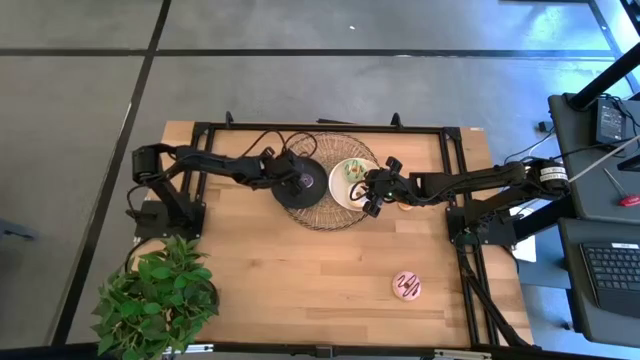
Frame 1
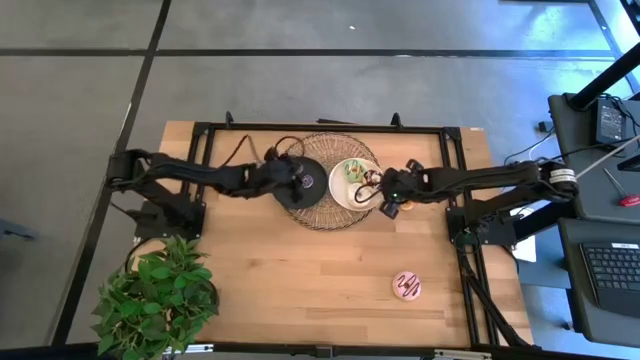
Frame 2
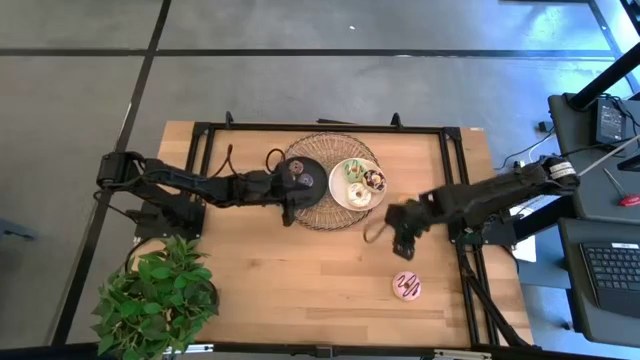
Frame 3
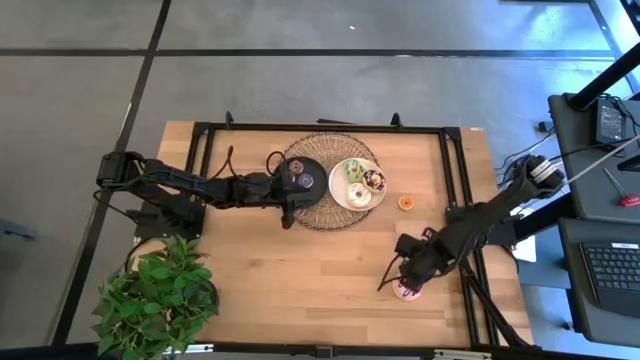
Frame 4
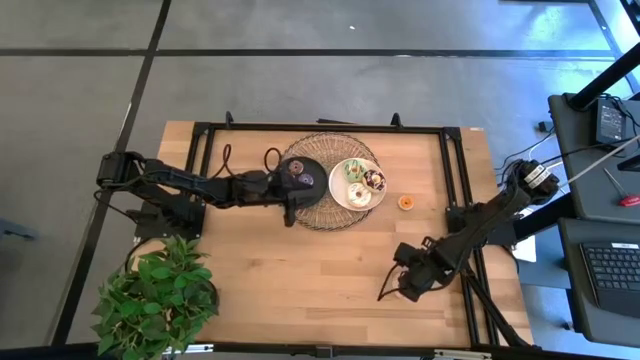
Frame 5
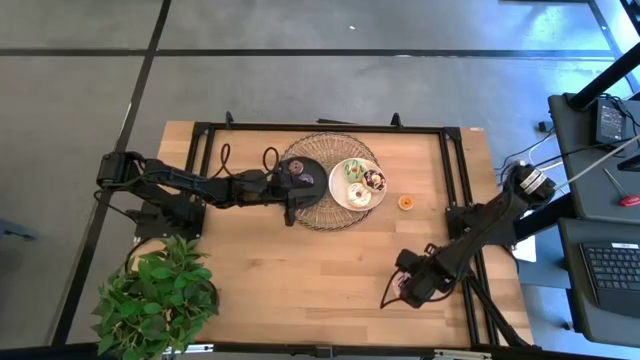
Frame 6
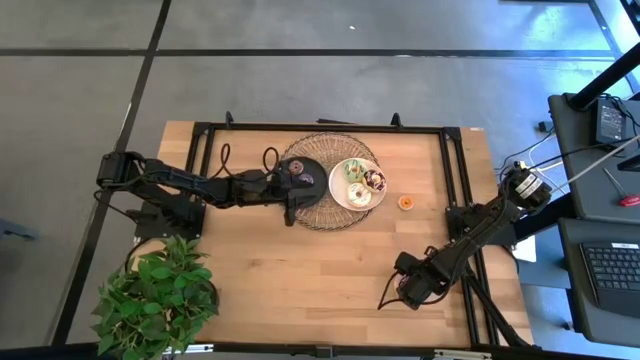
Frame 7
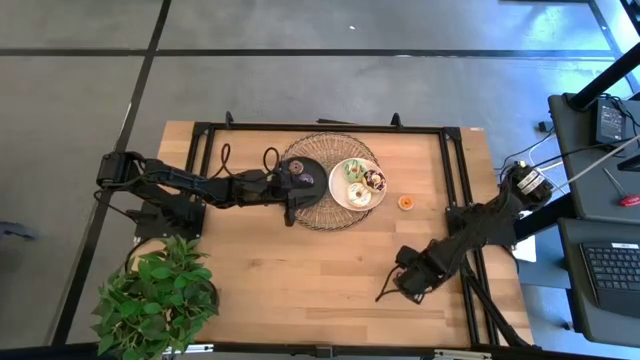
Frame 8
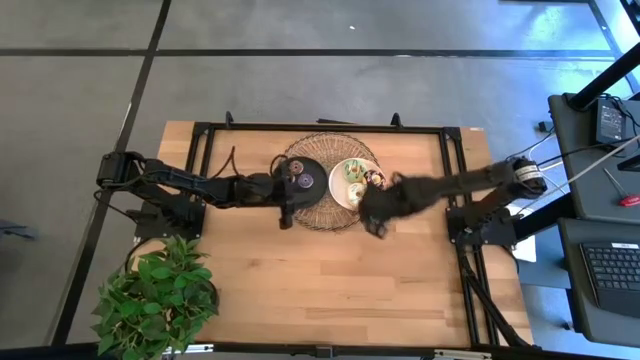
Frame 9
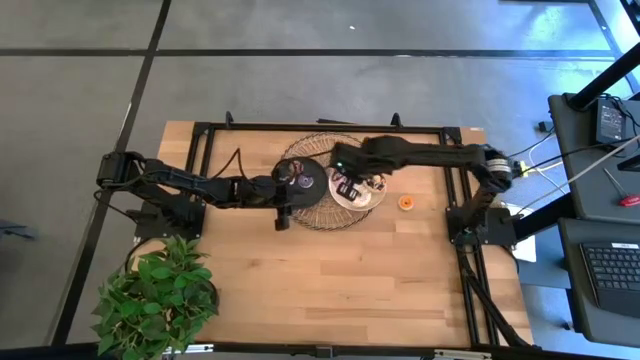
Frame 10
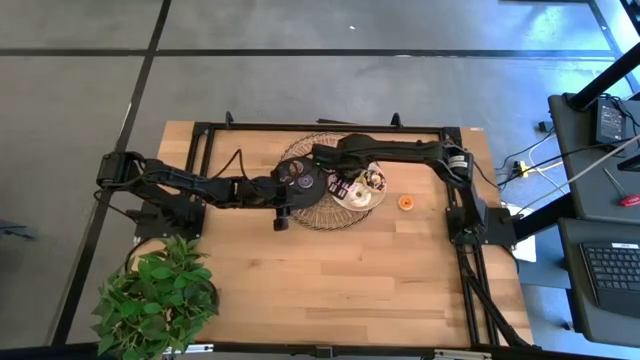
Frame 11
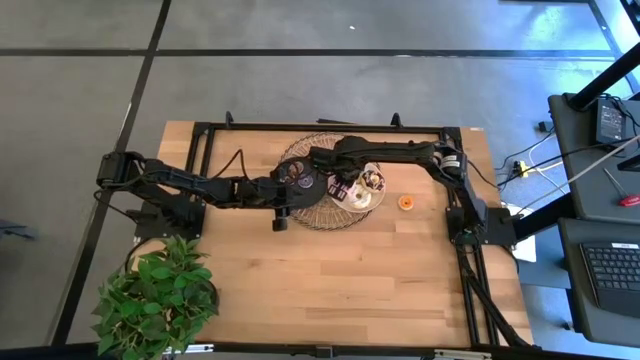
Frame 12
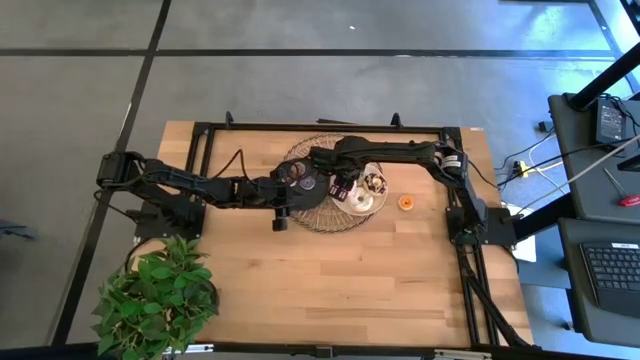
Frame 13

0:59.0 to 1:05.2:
Task: Pick & Place donuts
Put the big purple donut on the white plate

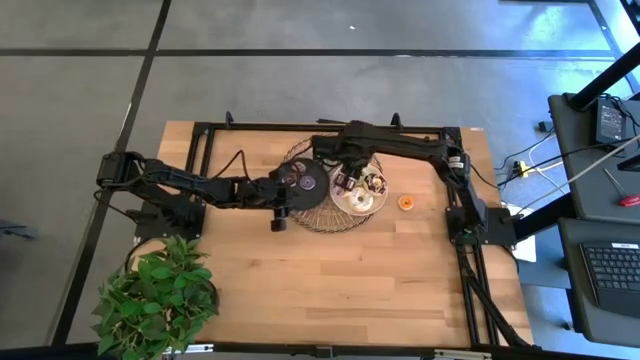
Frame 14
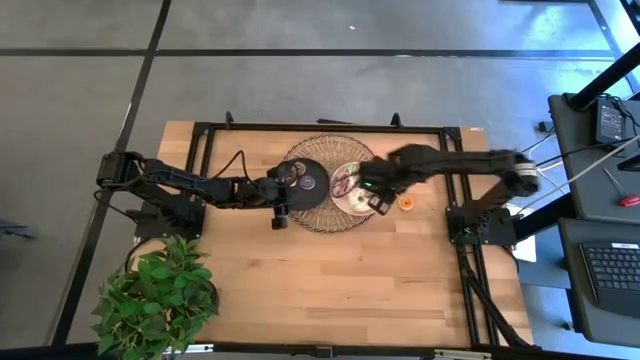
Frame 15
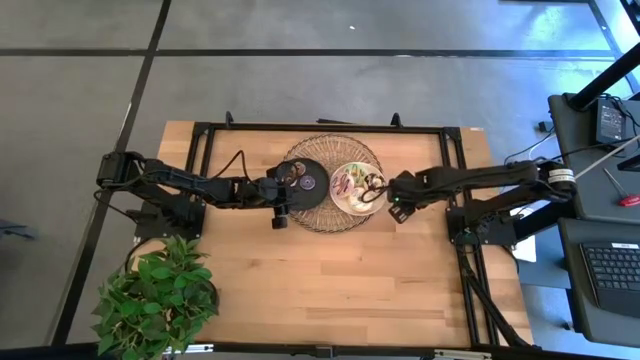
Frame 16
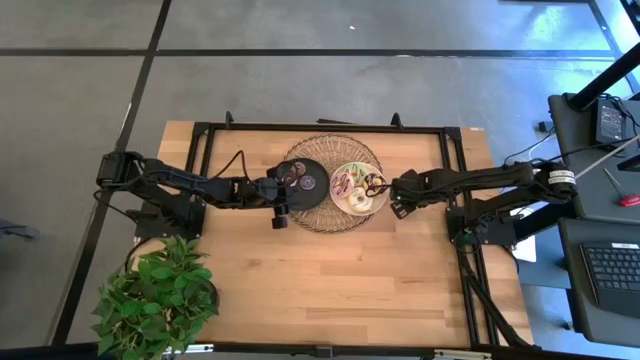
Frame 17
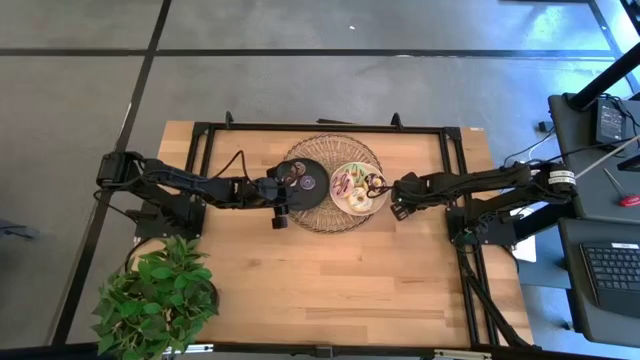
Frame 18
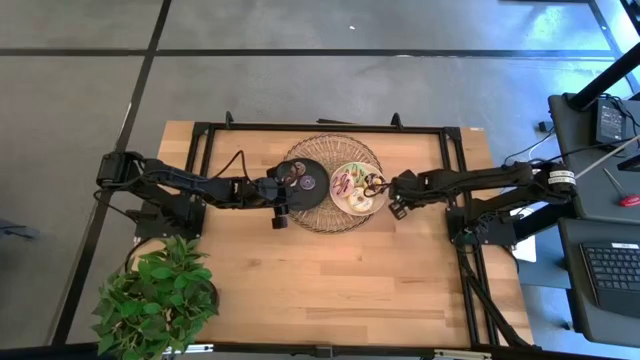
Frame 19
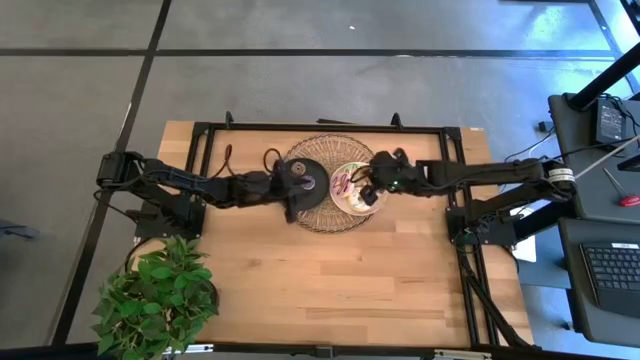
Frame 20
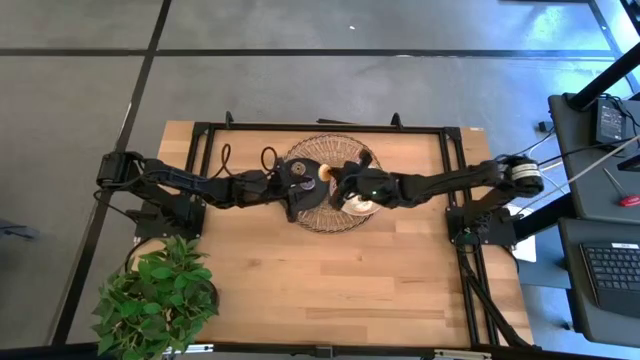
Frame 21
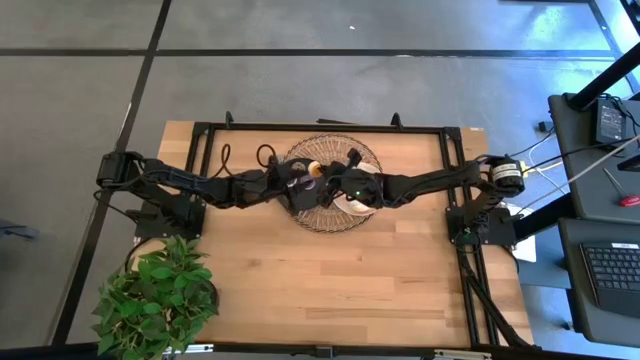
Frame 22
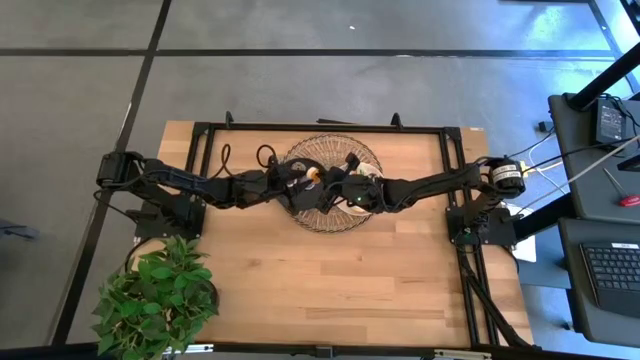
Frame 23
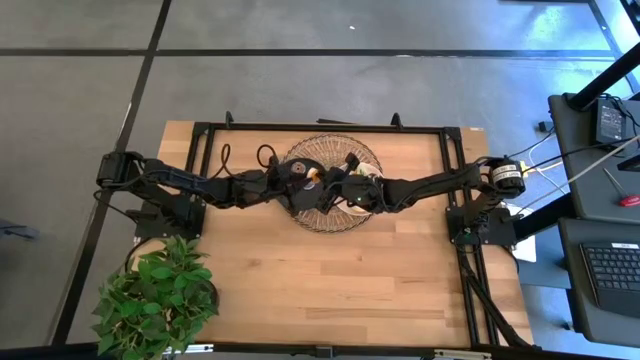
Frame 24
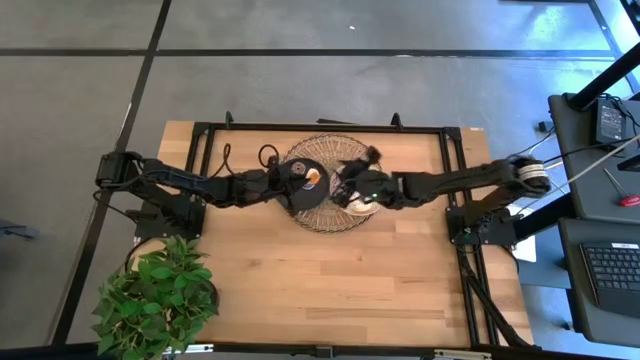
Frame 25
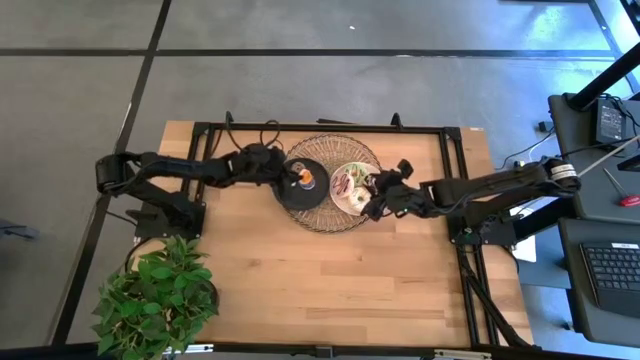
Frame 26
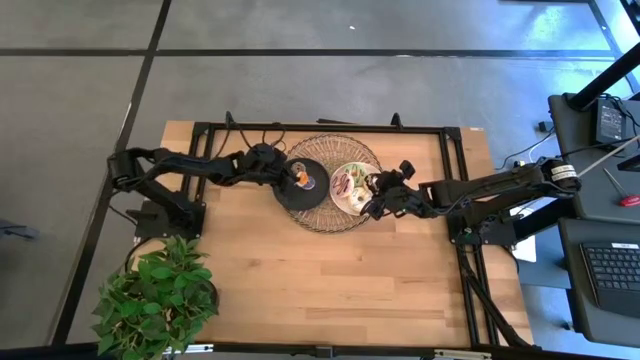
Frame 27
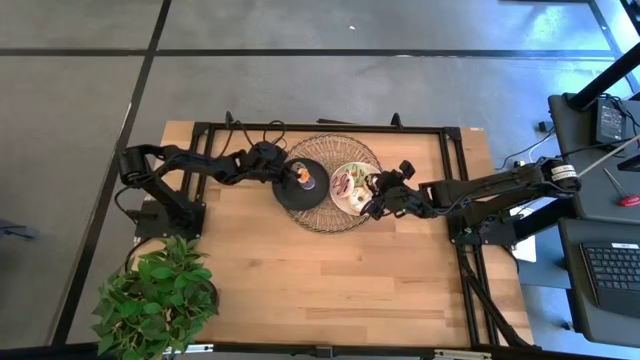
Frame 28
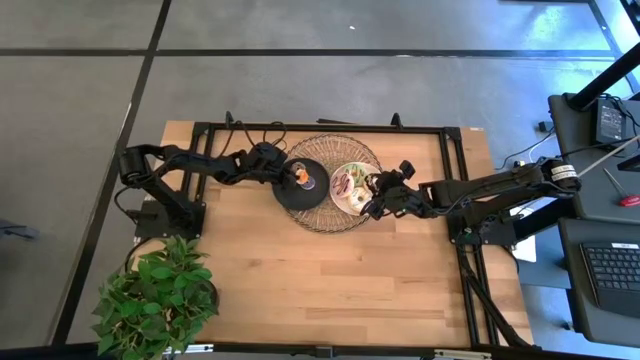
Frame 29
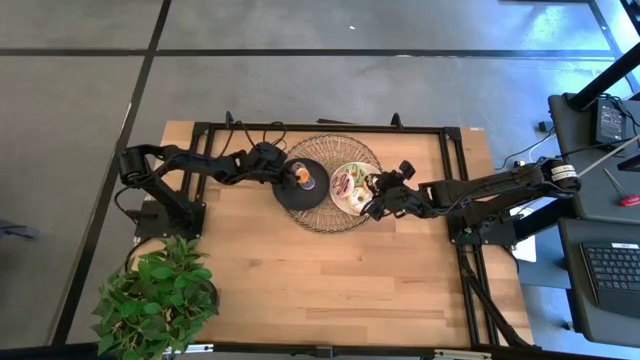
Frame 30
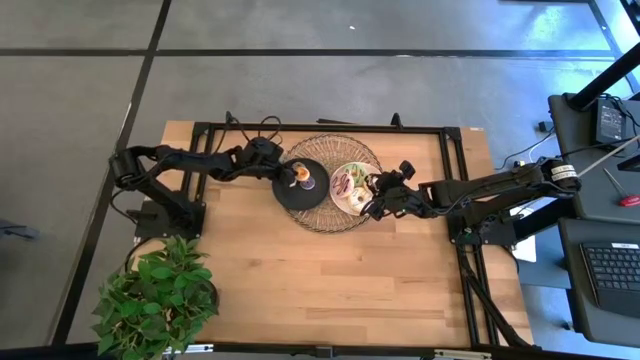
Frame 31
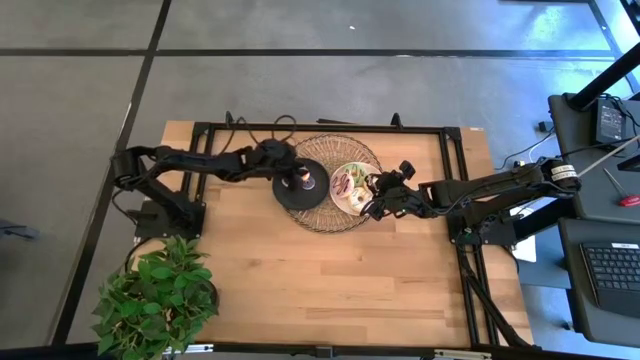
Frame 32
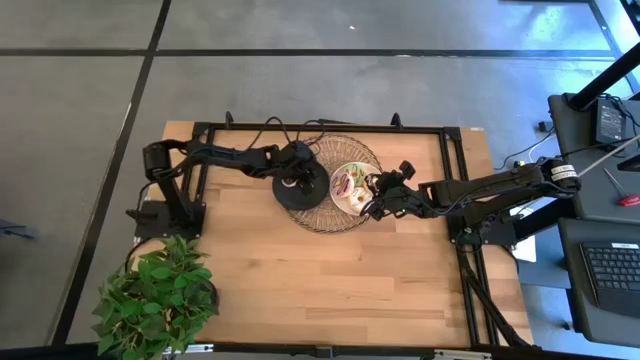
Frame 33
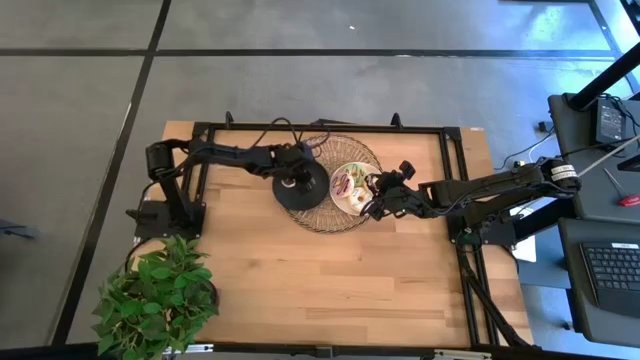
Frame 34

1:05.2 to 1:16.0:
Put the small orange donut on the black plate

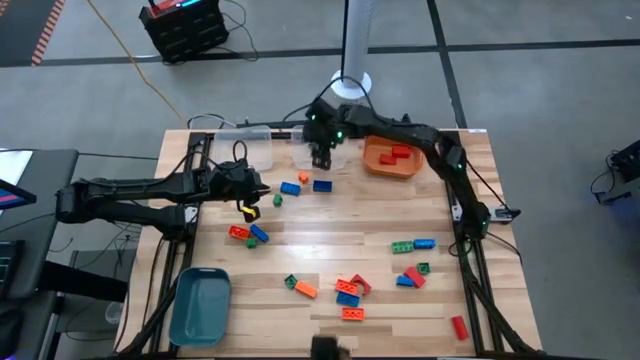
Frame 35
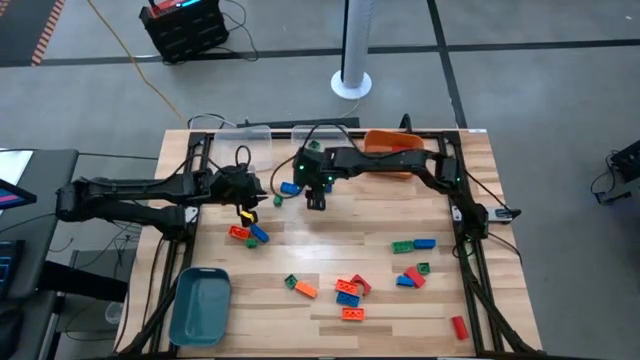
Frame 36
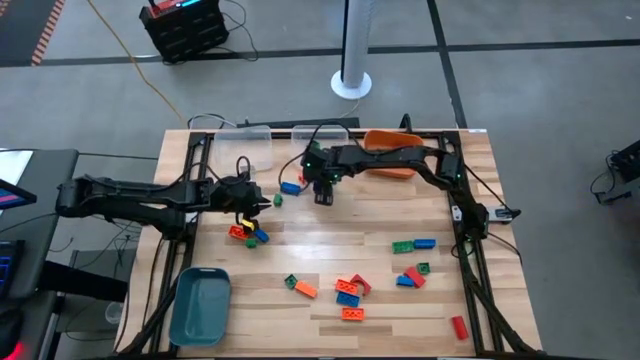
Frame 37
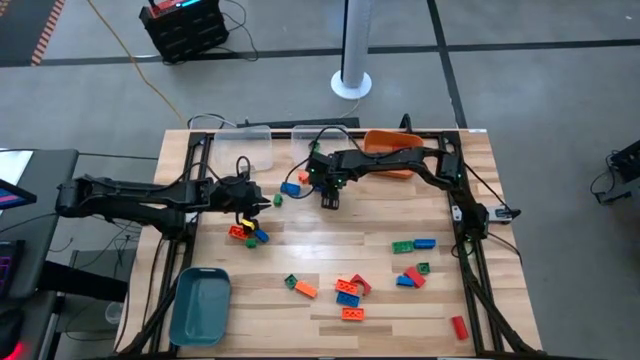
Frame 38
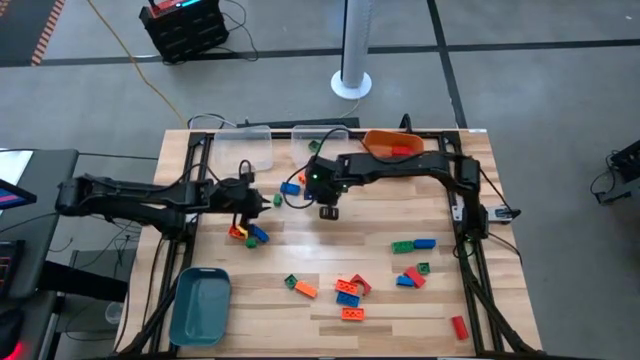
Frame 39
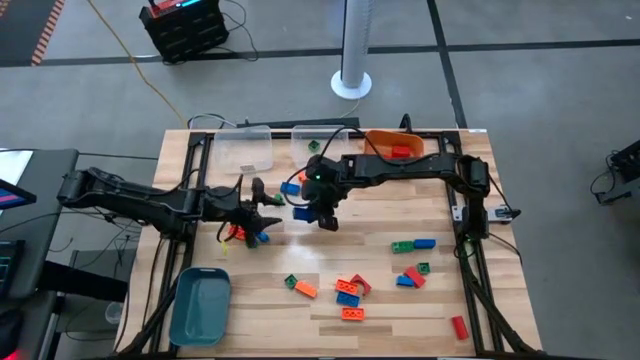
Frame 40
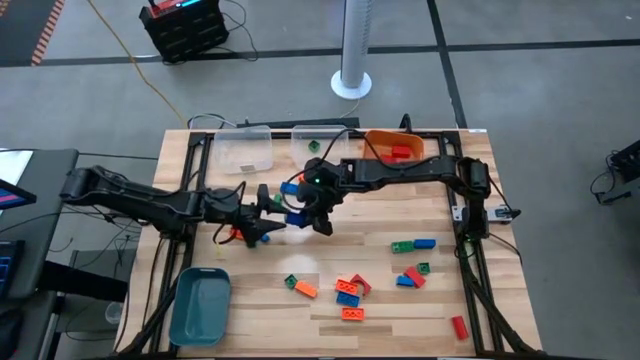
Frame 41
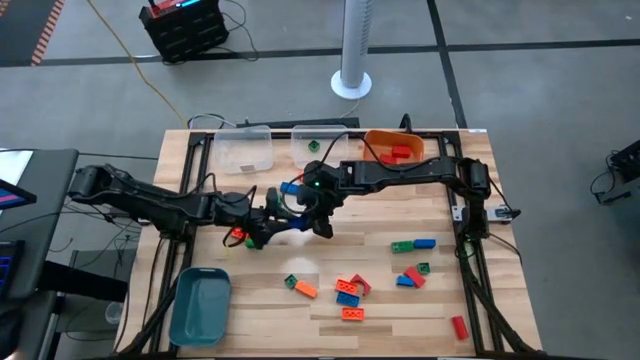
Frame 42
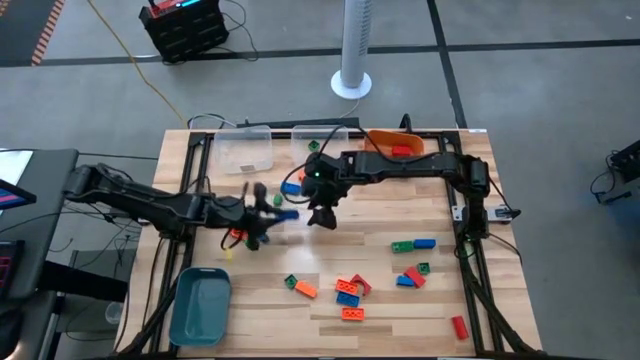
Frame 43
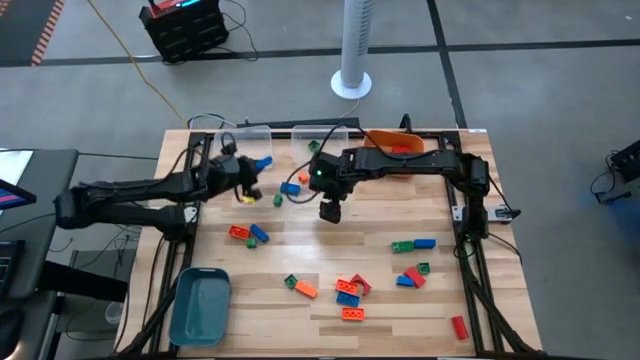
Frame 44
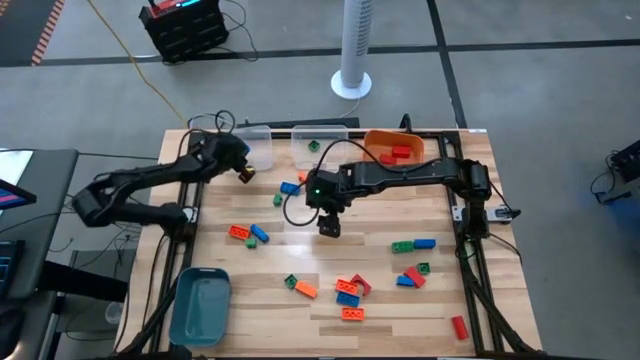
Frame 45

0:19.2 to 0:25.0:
Task: Sort blocks
Put the blue game piece into the left transparent bin
